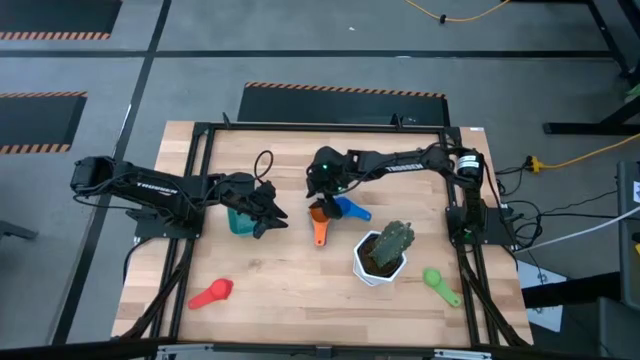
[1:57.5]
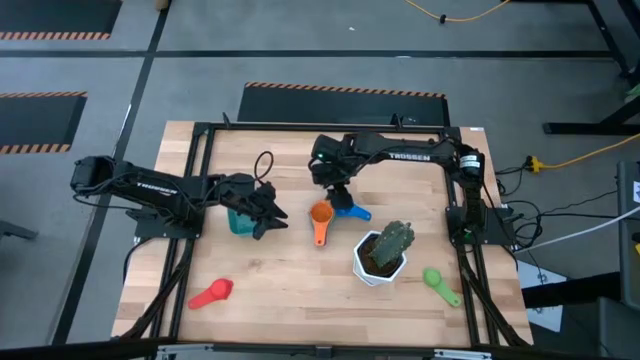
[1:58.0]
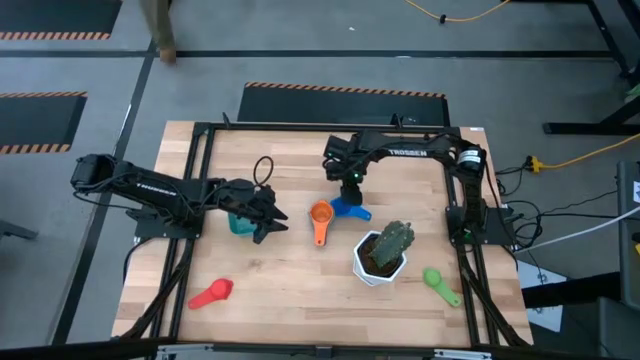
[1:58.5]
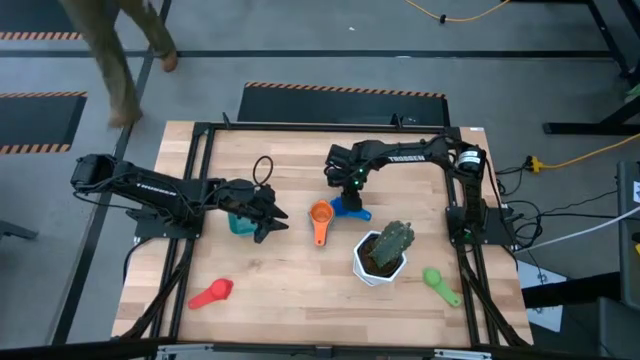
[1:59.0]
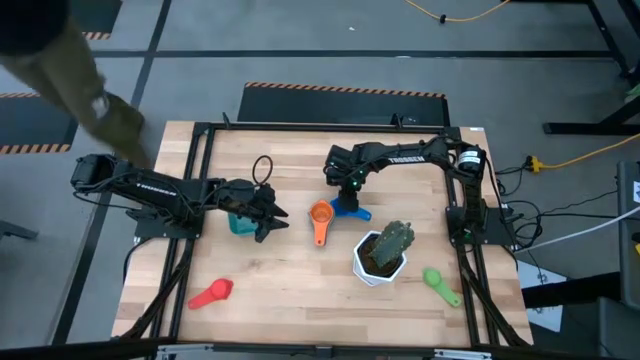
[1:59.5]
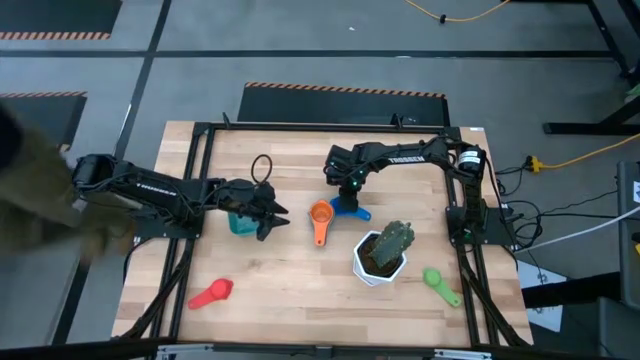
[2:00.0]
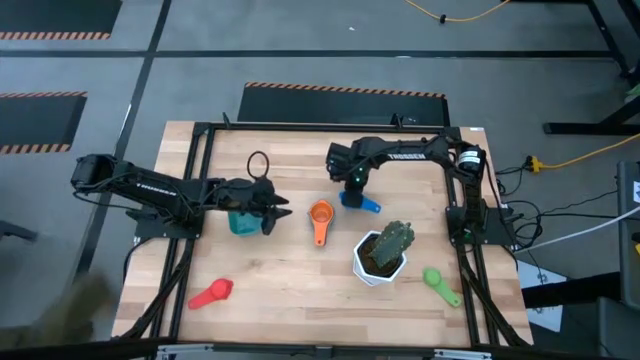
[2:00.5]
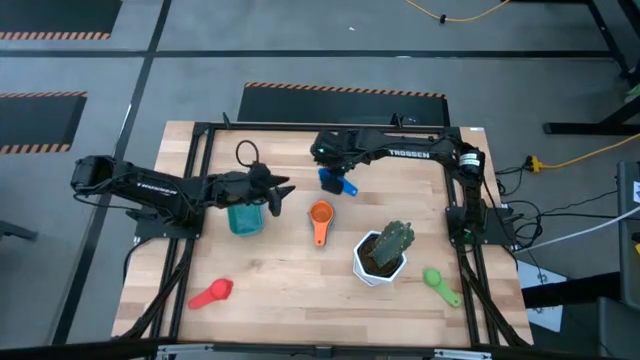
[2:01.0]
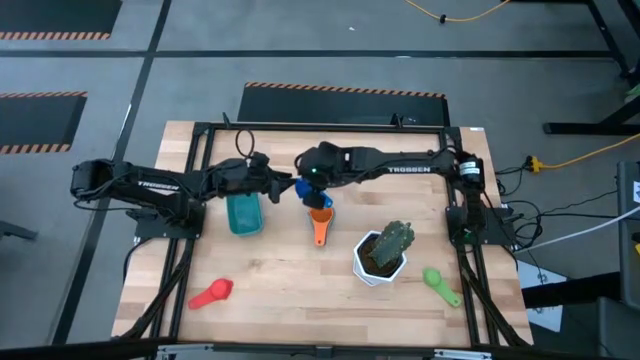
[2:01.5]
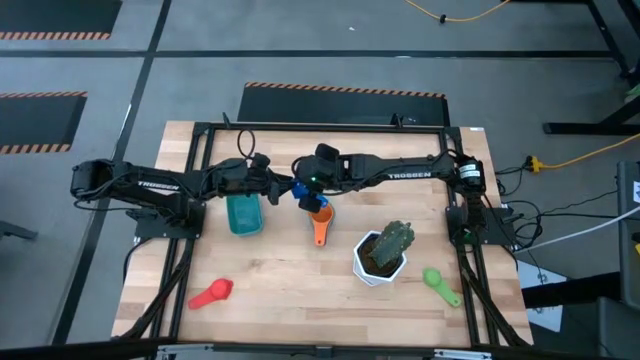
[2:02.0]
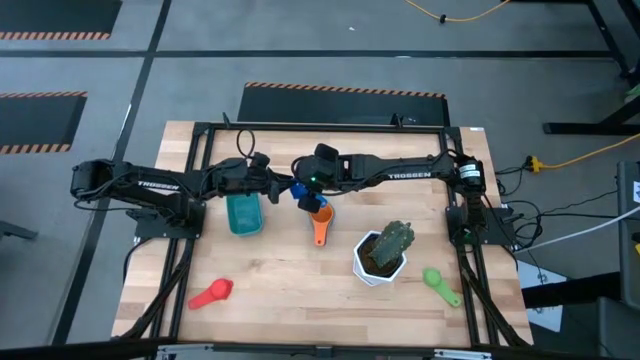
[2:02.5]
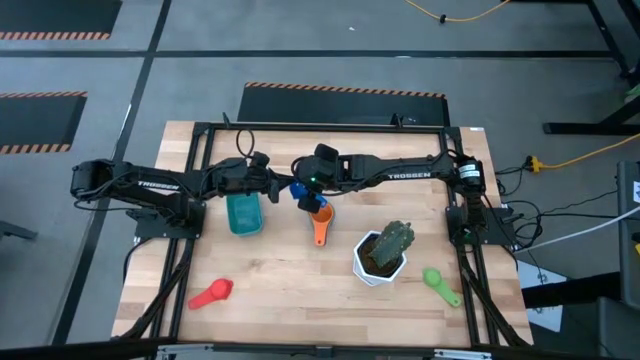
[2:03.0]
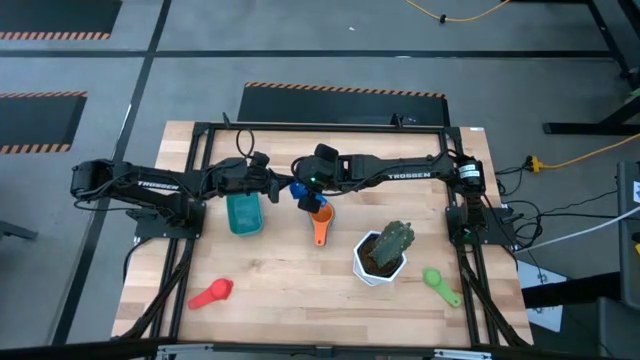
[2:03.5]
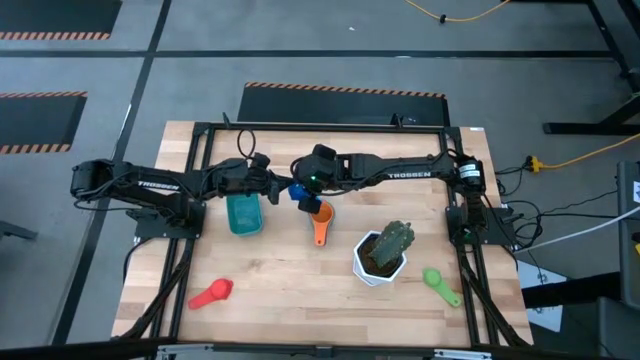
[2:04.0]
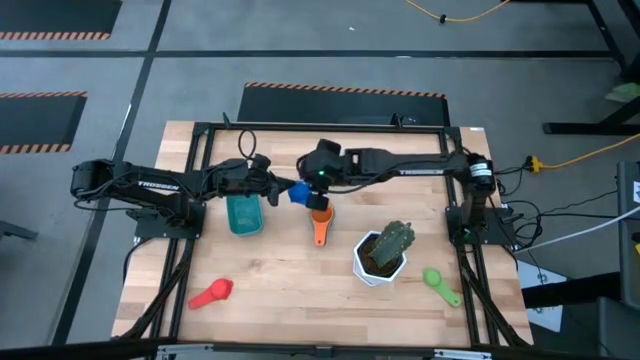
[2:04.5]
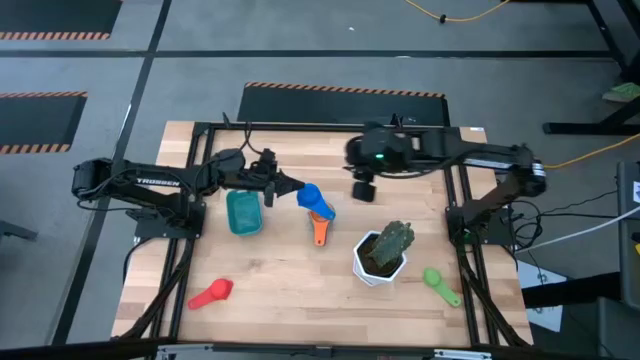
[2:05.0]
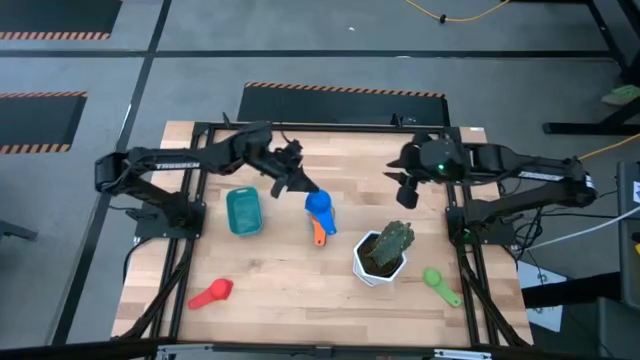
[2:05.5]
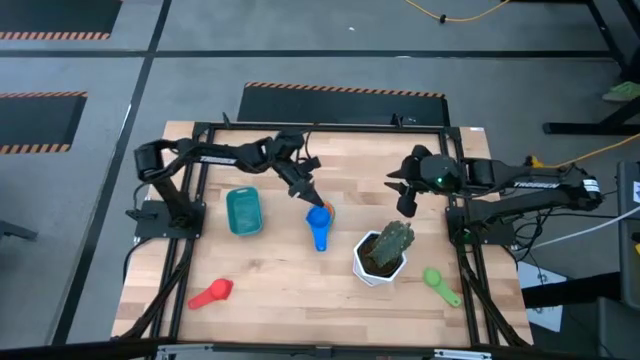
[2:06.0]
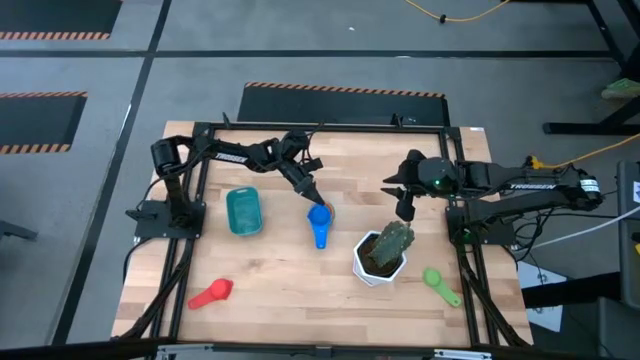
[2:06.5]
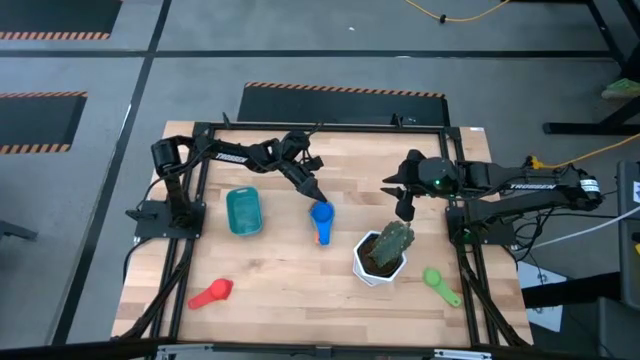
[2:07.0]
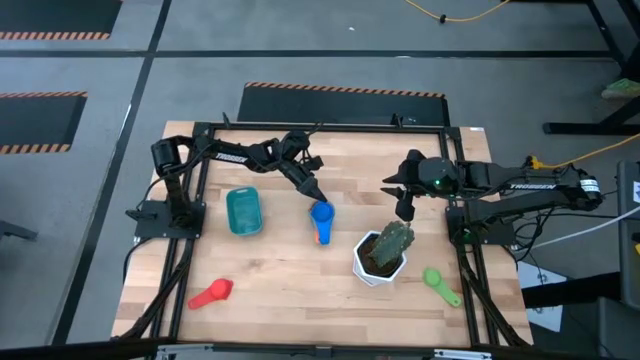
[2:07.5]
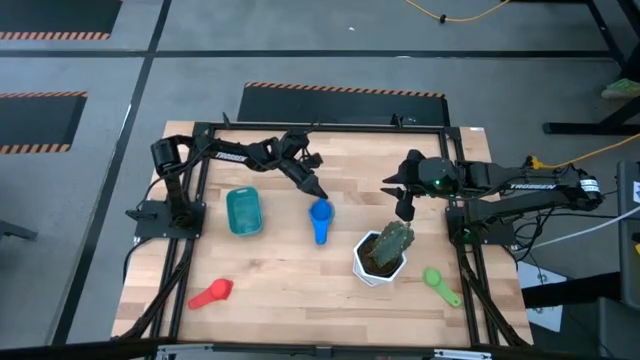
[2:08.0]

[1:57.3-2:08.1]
Task: Nest measuring cups in basket
Stack the blue measuring cup on top of the orange measuring cup

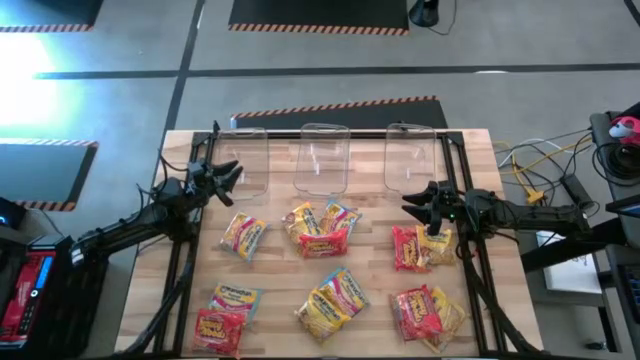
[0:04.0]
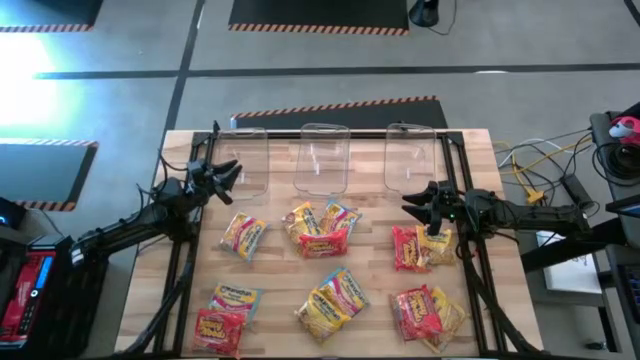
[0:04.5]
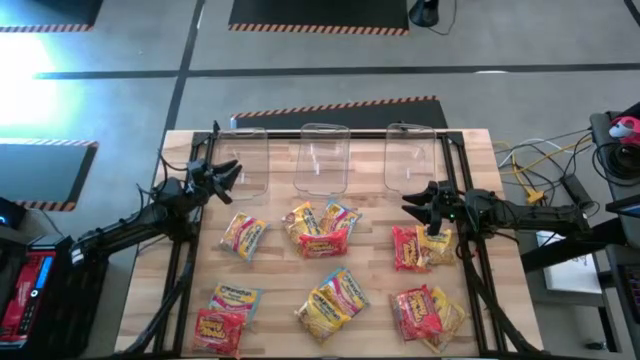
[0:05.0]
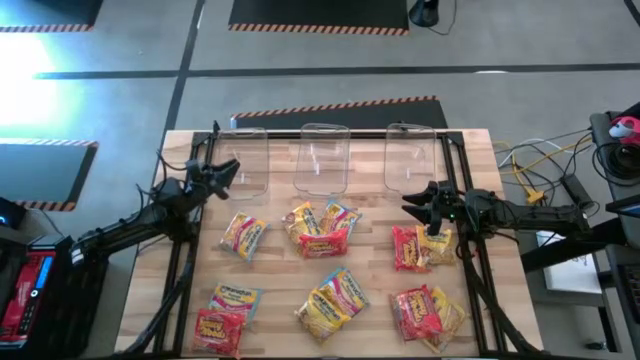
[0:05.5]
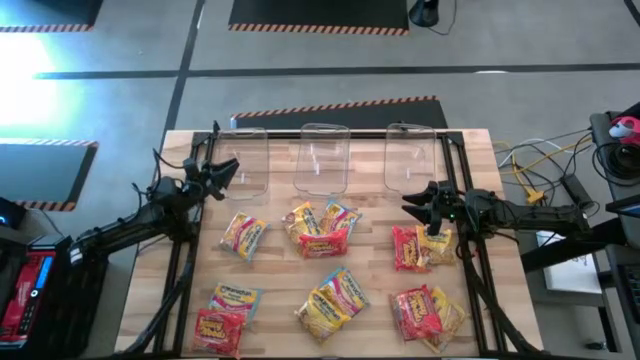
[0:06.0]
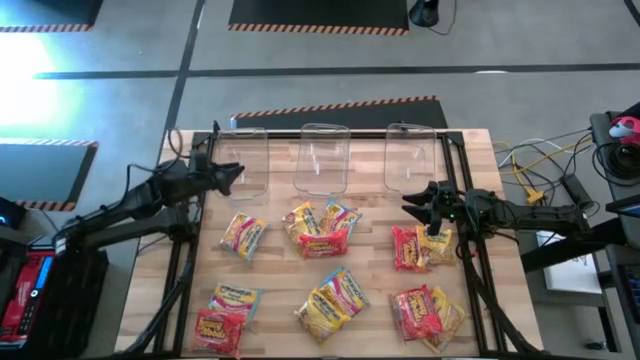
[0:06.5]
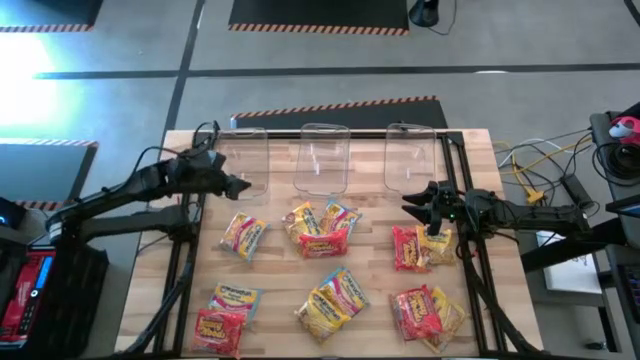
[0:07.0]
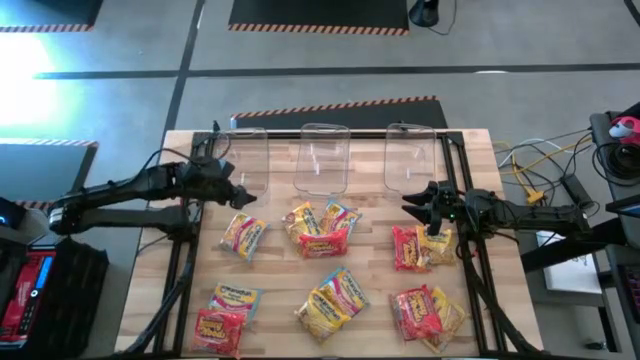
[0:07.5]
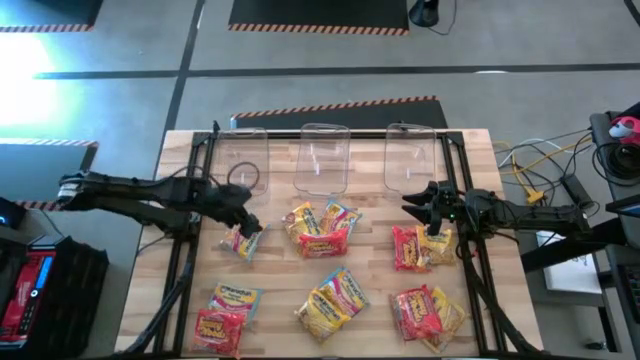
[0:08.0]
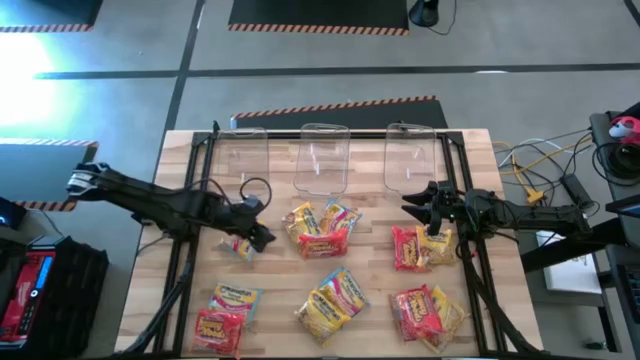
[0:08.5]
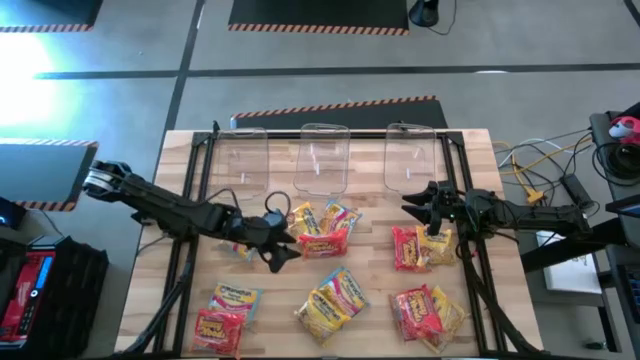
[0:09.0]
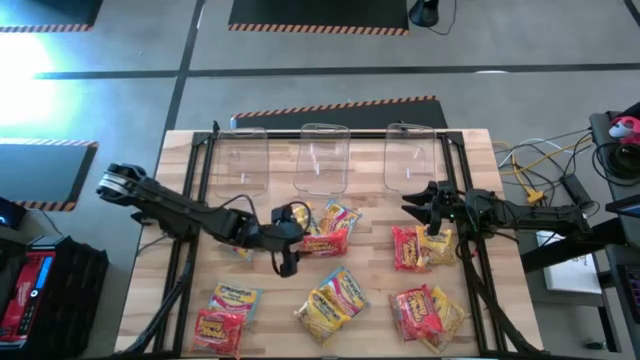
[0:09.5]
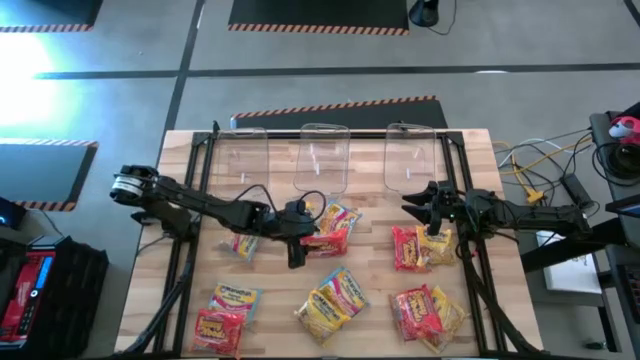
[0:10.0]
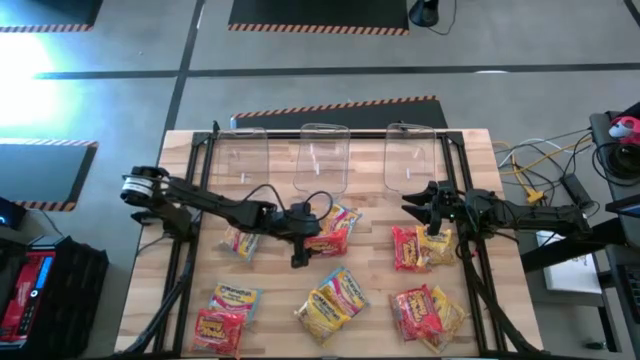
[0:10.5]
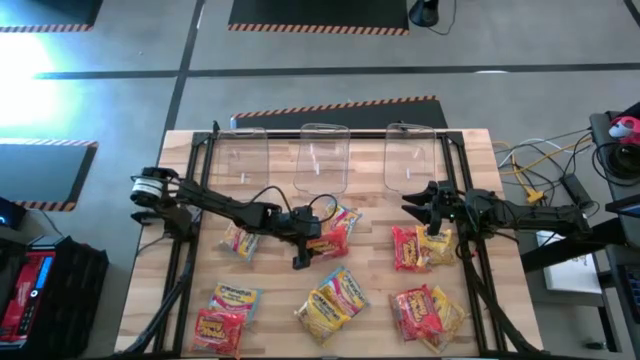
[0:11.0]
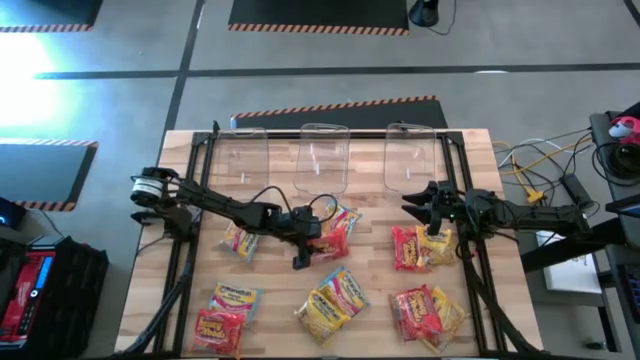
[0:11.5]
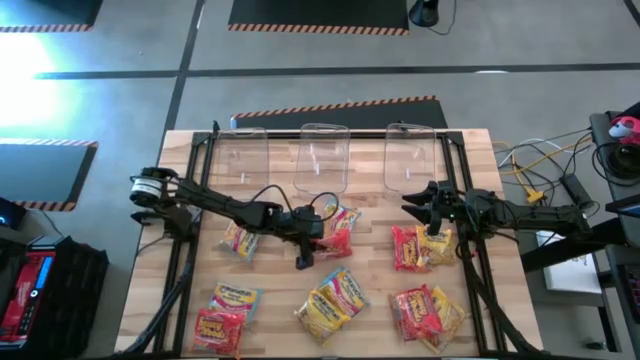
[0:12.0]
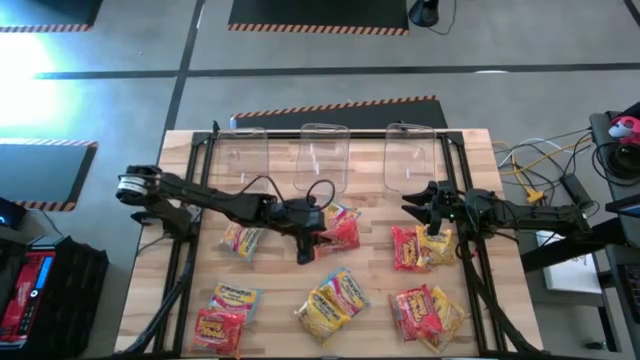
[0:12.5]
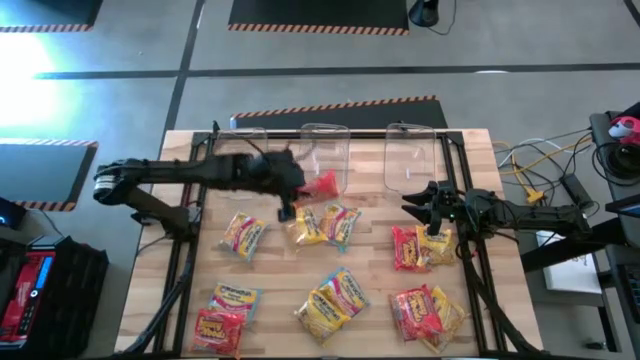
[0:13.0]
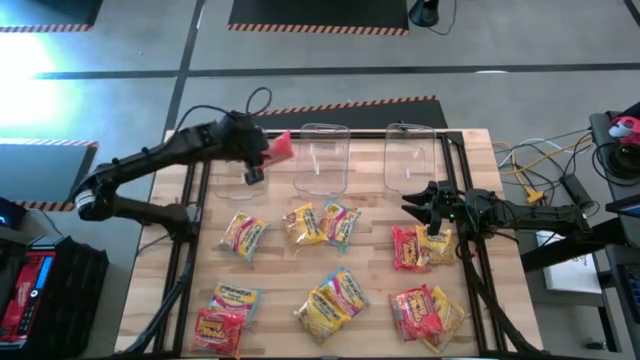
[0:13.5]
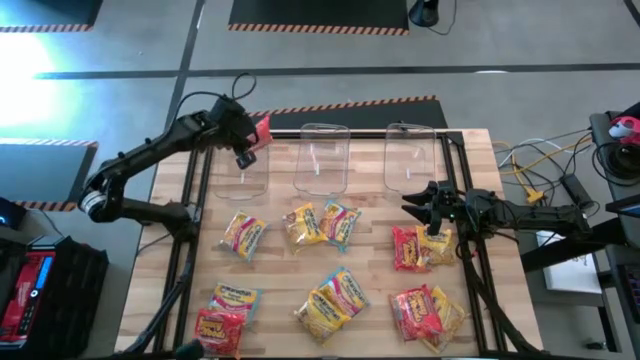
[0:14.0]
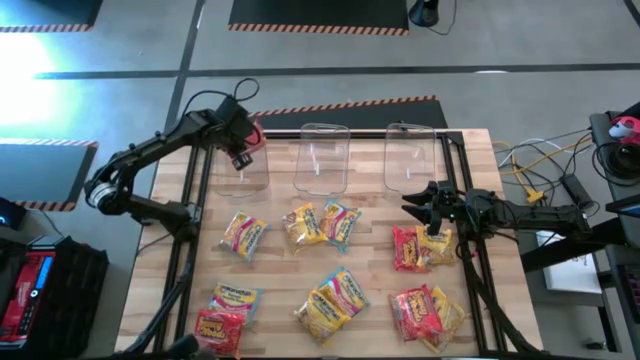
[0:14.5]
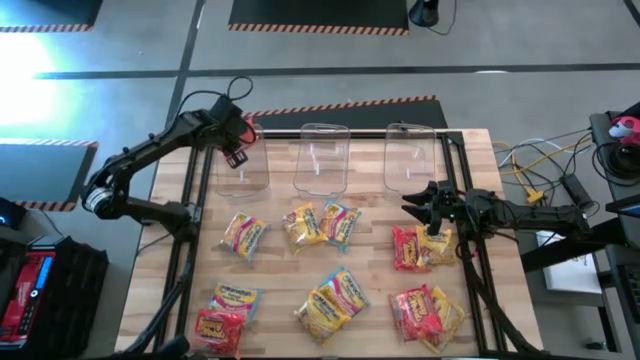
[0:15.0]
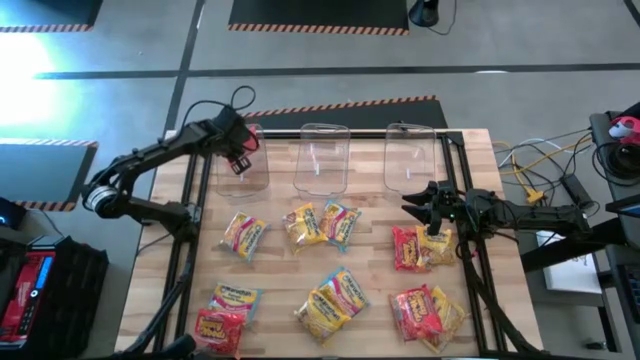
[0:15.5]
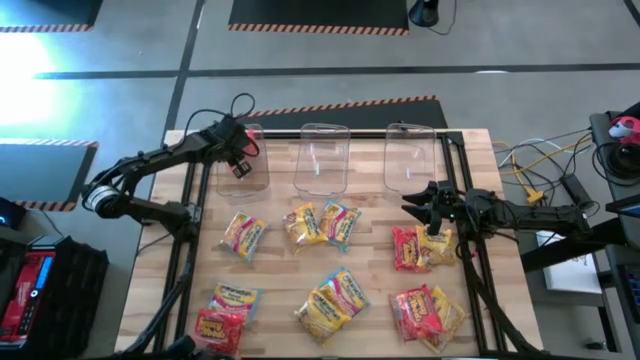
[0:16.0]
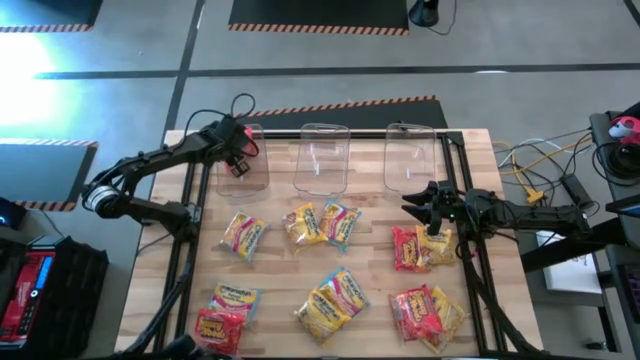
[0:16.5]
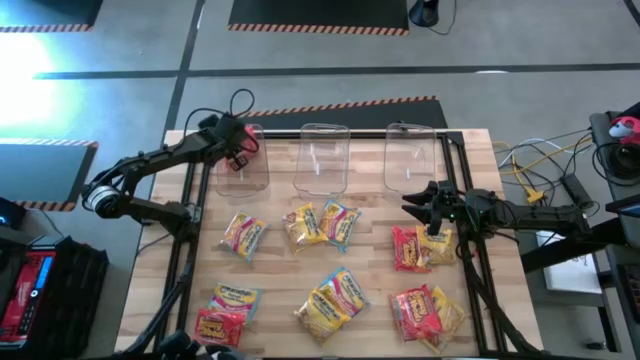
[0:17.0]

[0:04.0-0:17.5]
Task: Sort Maruchan noodles
Put the orange noodle pack into the left transparent bin
